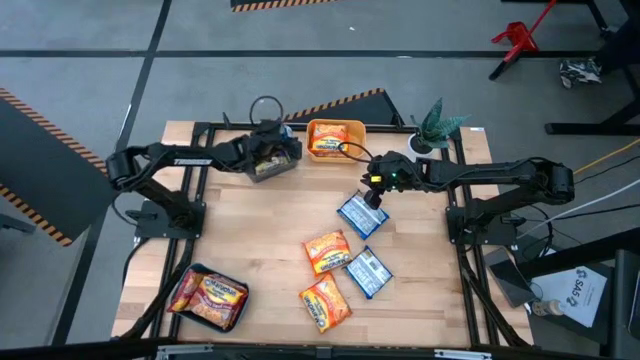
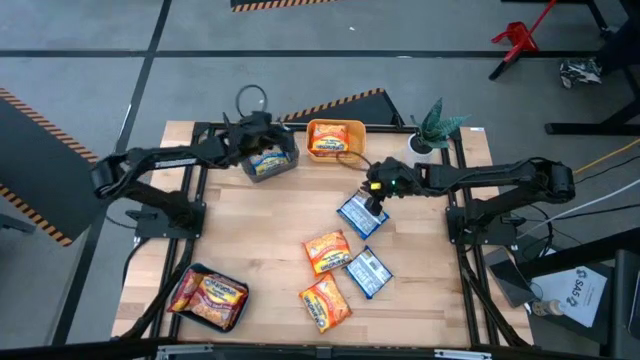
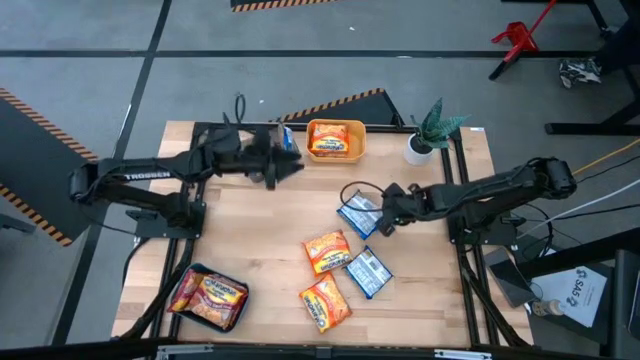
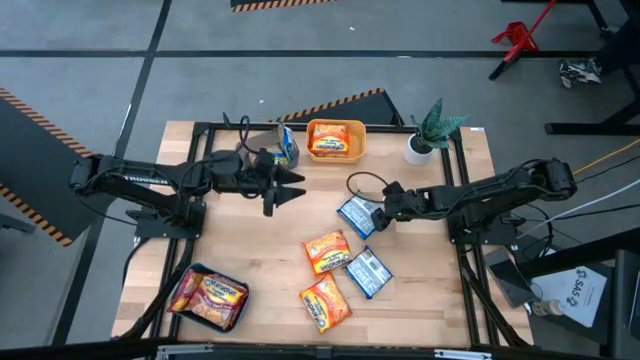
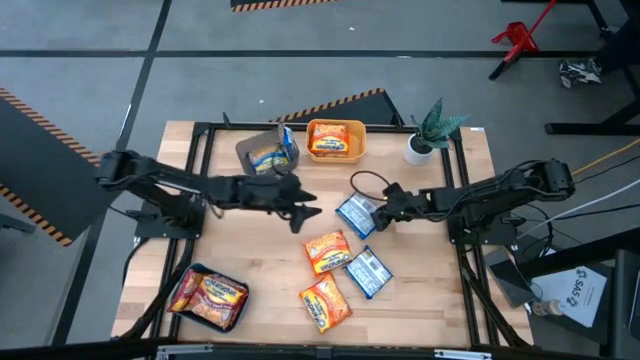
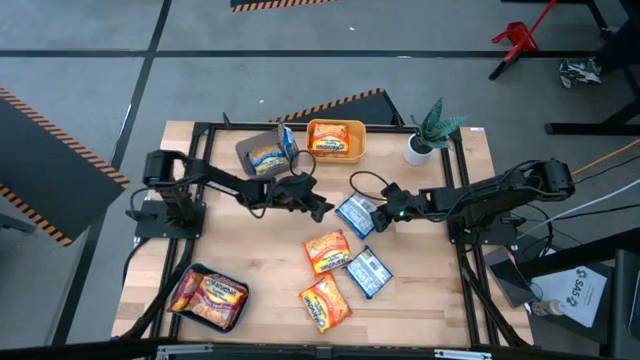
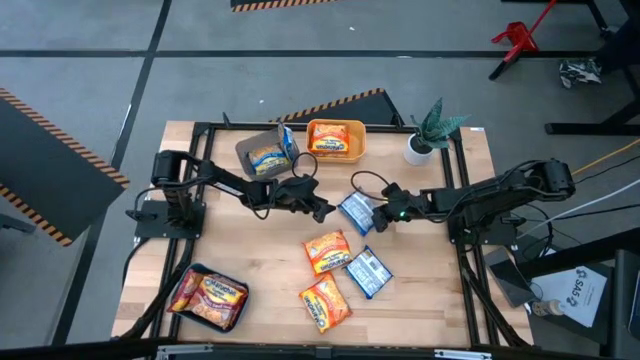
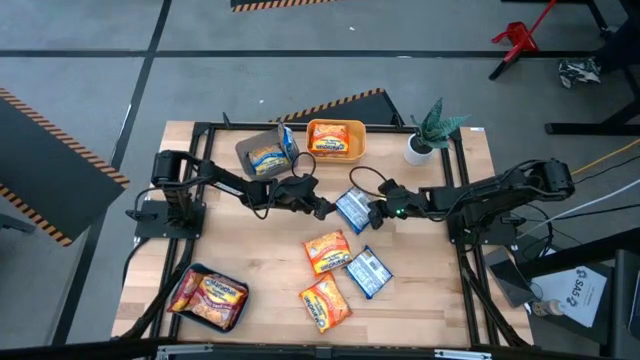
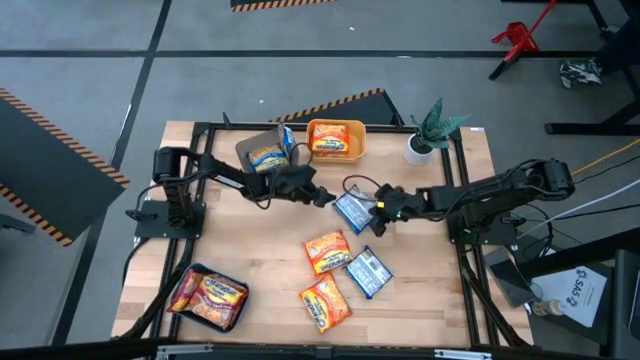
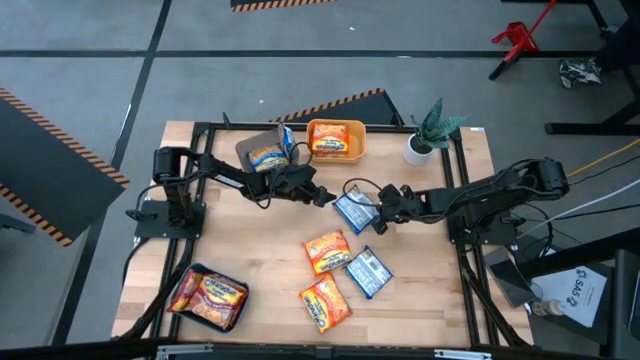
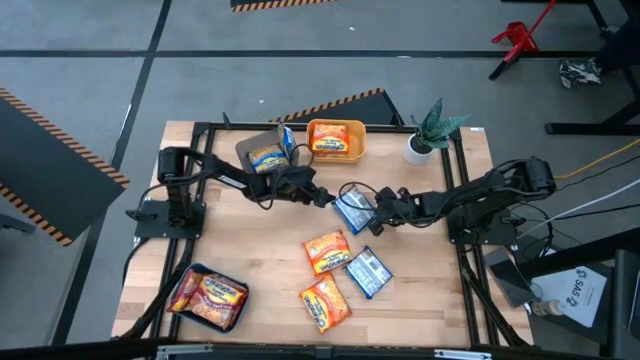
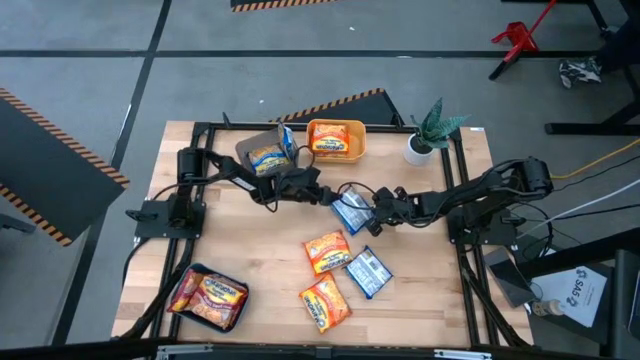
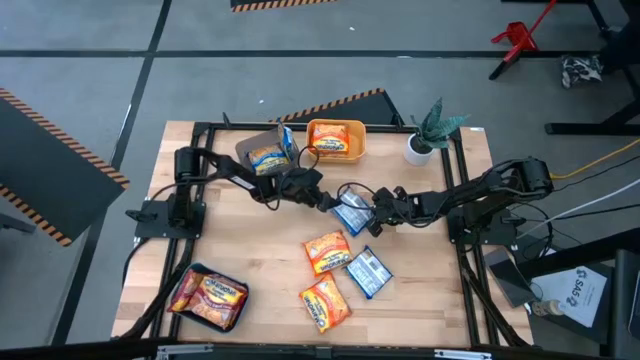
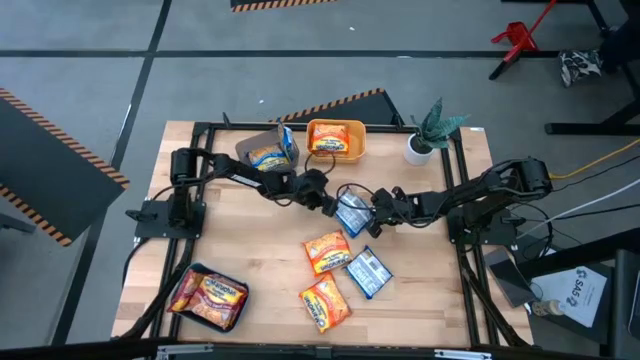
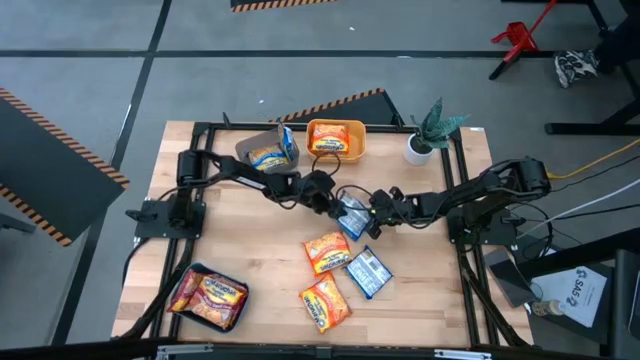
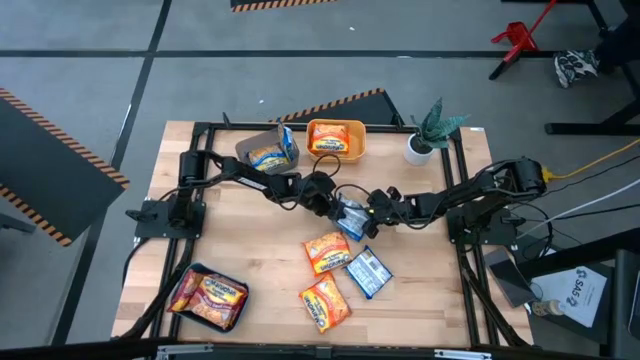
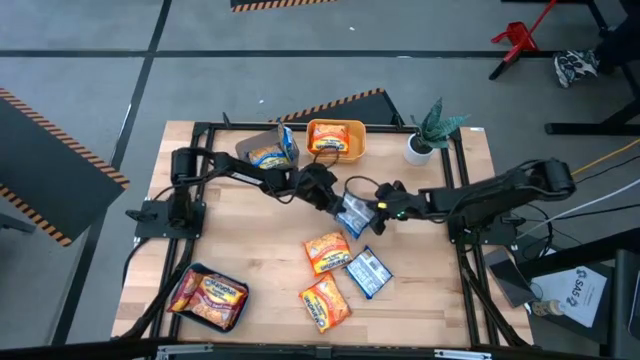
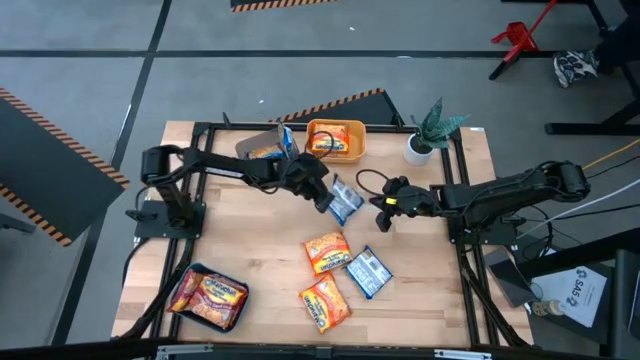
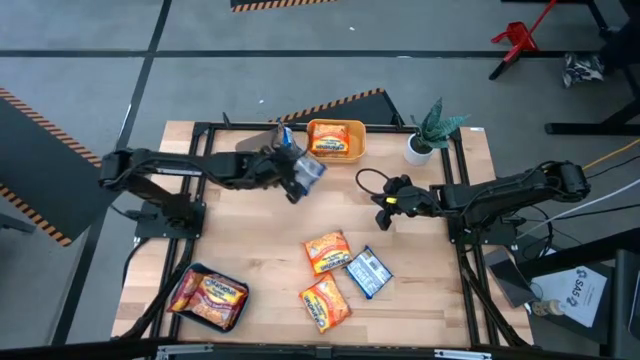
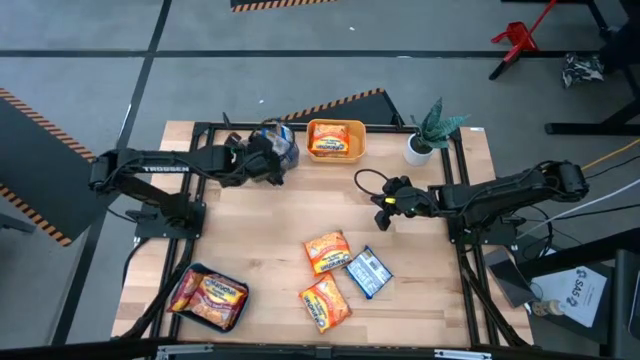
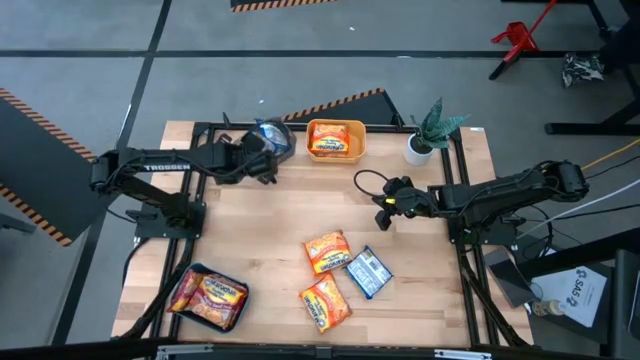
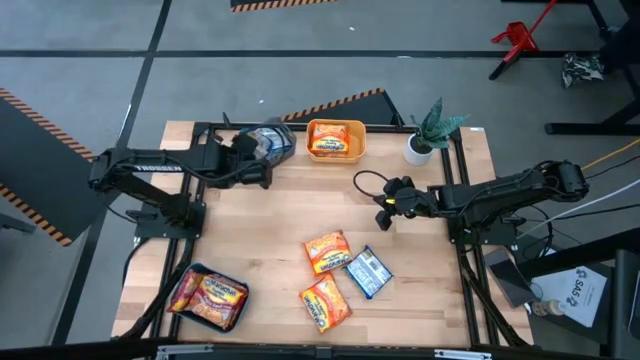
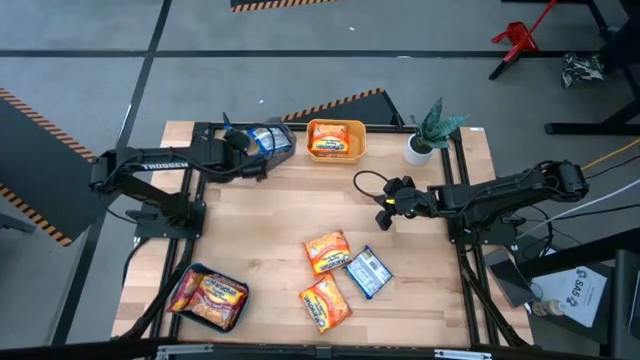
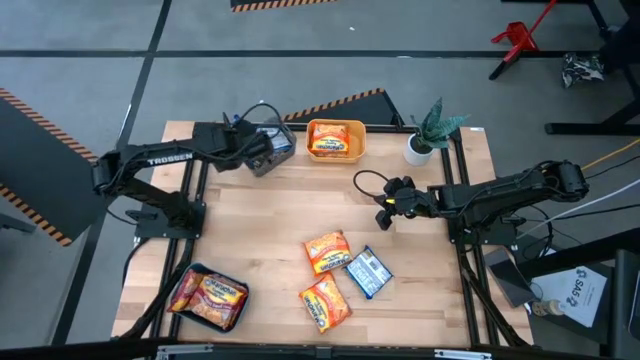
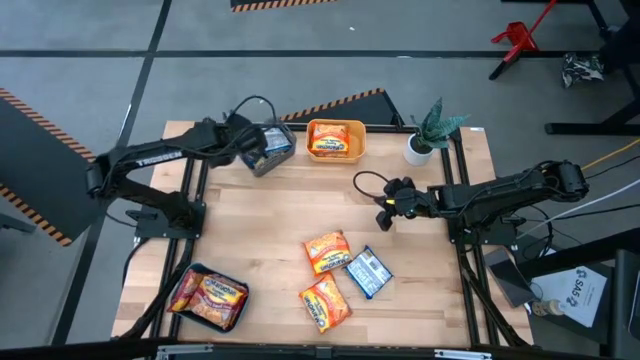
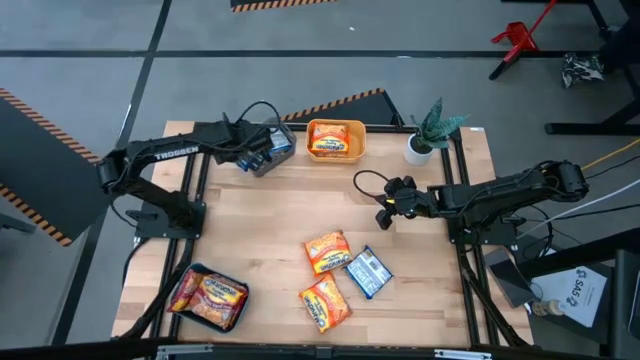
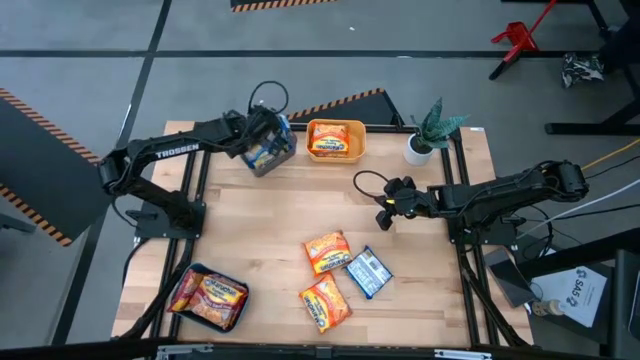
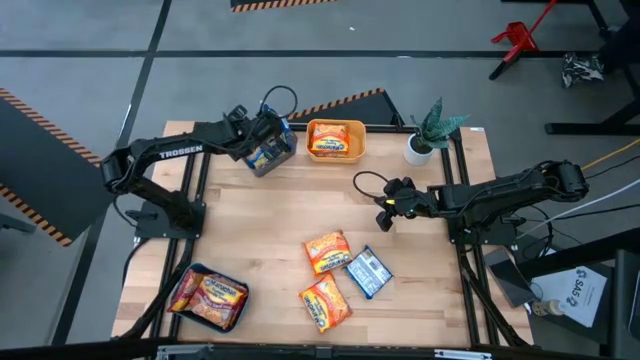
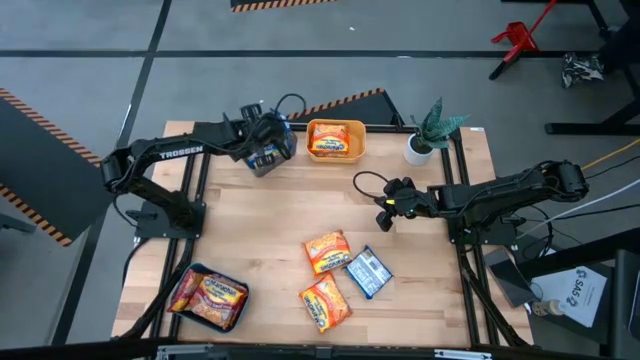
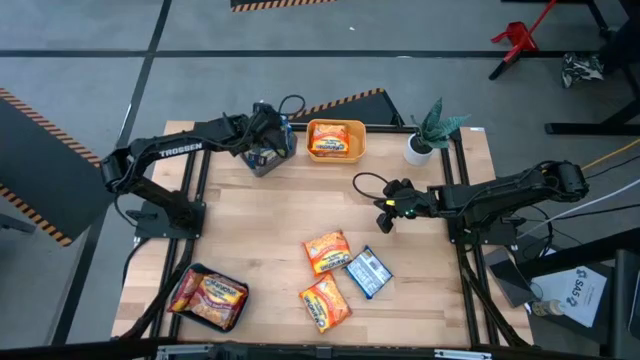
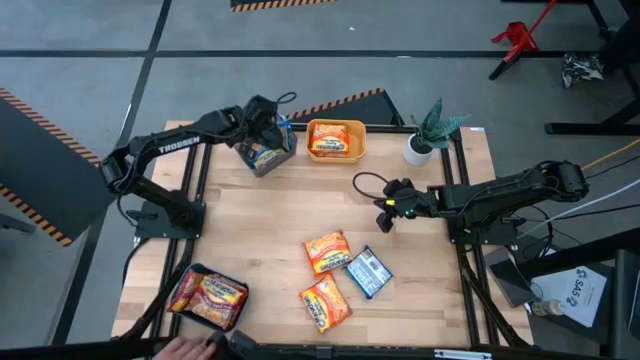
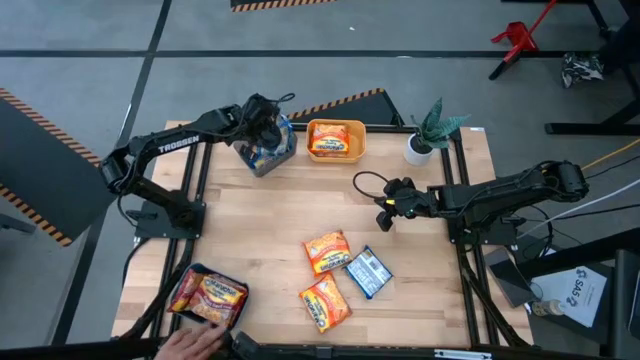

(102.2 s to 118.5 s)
Task: Sort Maruchan noodles
Put the pack of blue ramen noodle soup into the transparent black bin

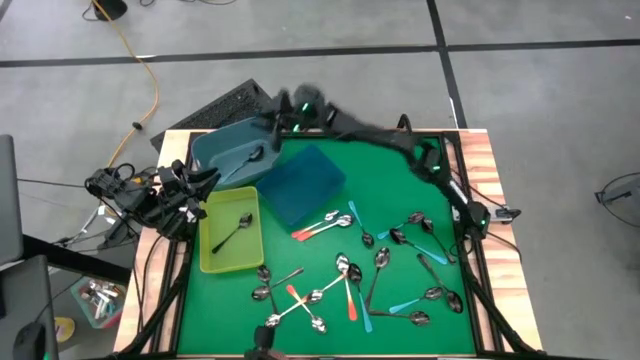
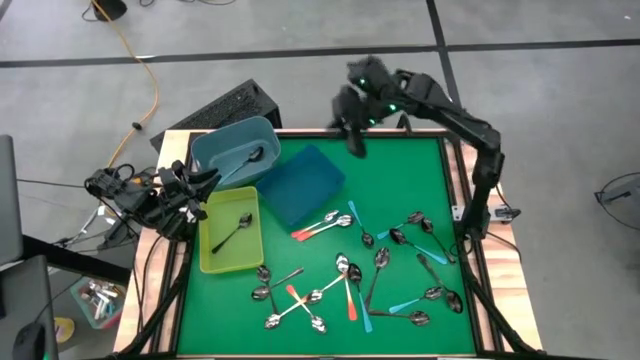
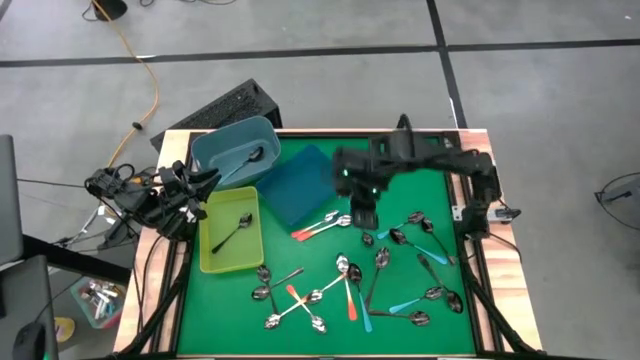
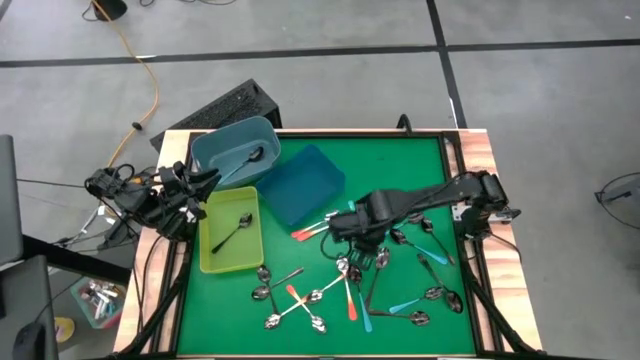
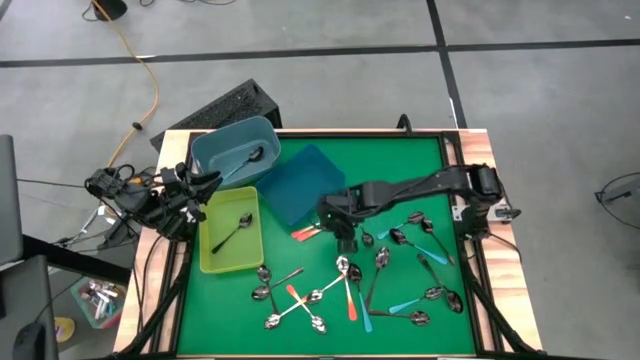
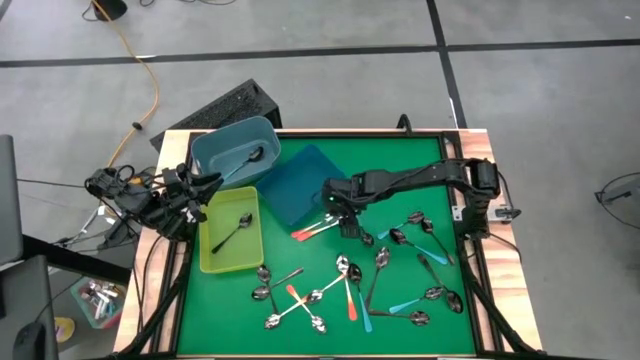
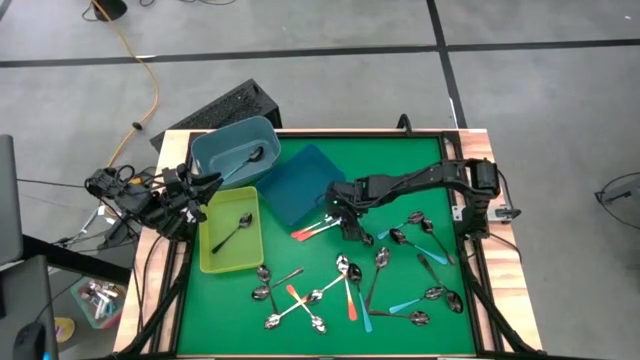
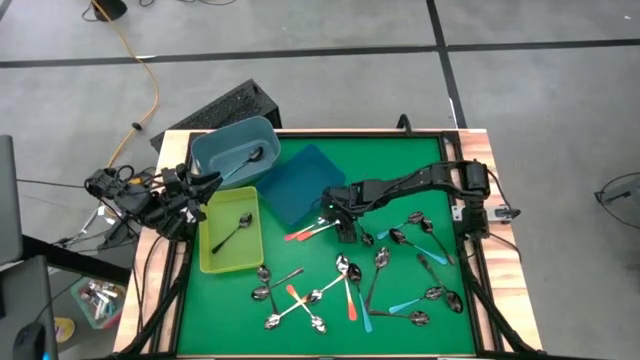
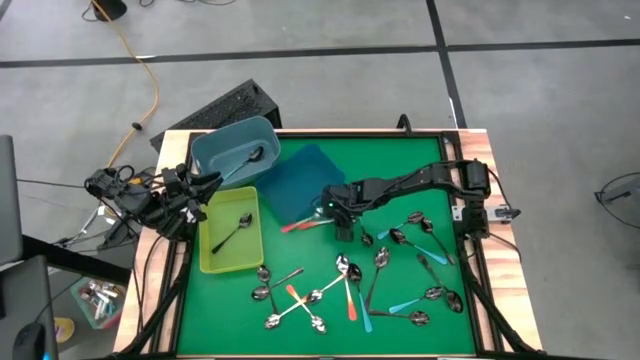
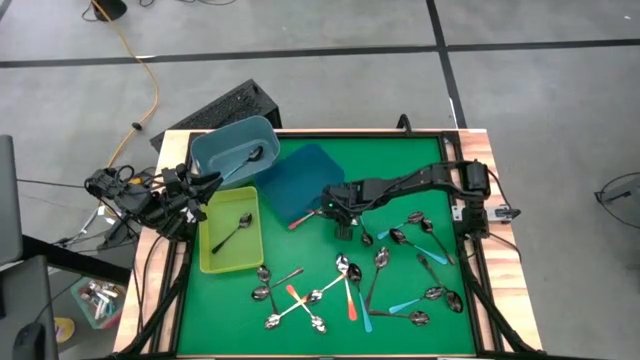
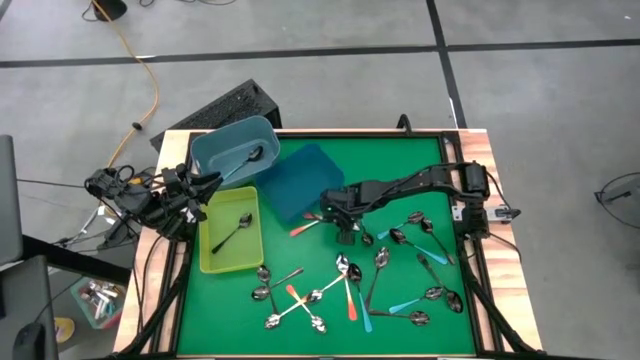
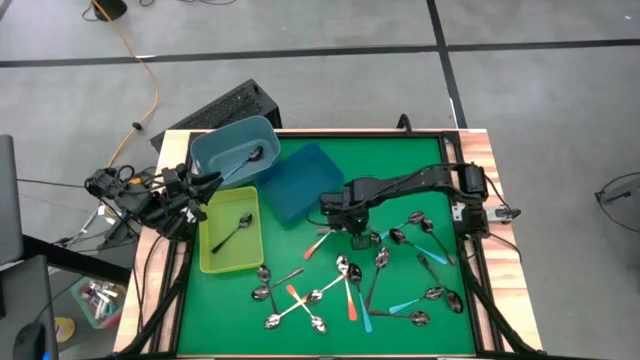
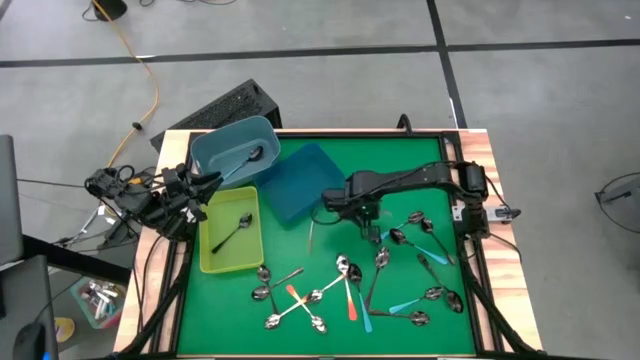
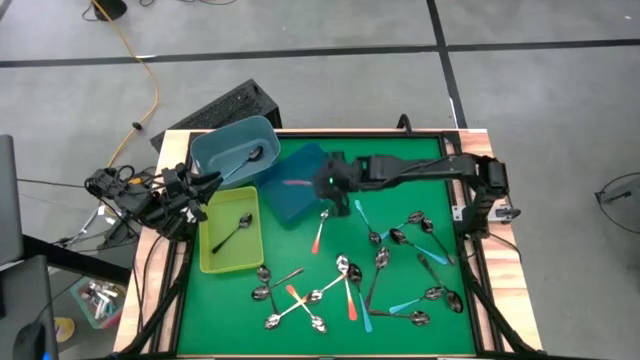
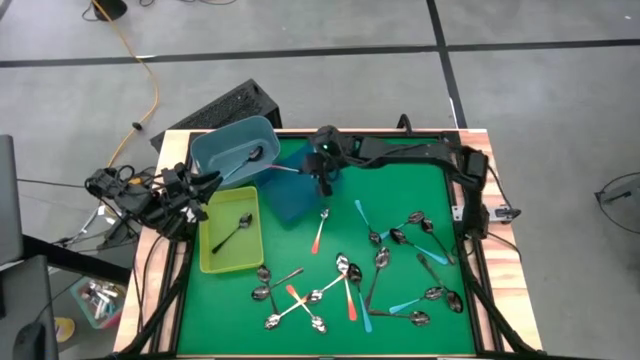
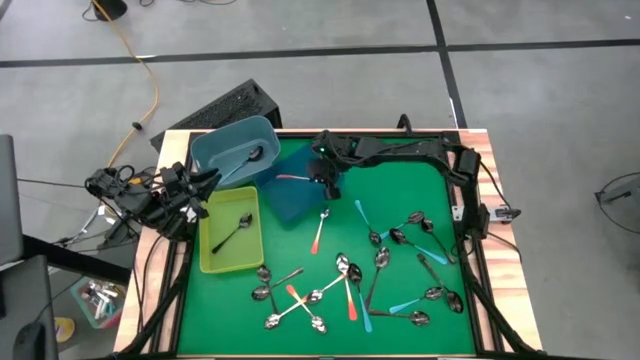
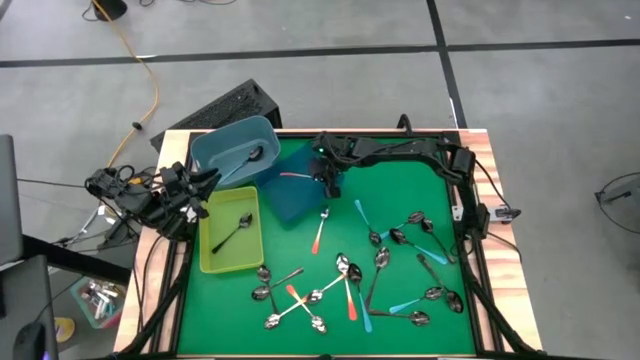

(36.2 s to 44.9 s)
Task: Sort silverware by color (type)
Put the orange spoon into the blue bin
